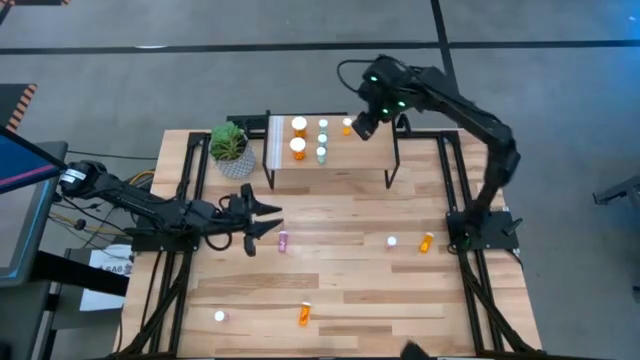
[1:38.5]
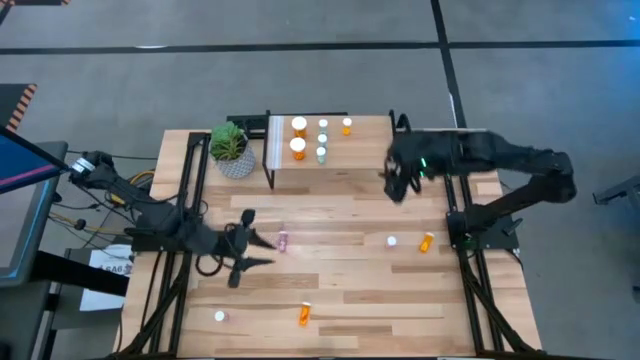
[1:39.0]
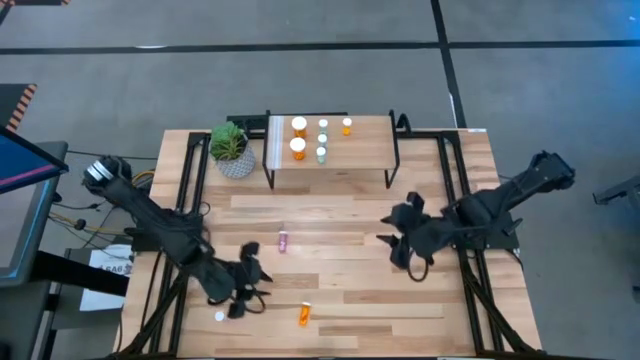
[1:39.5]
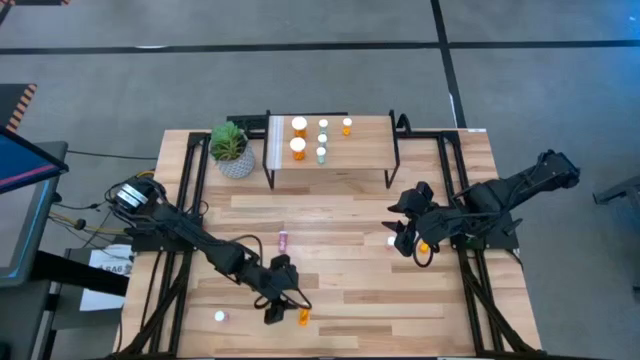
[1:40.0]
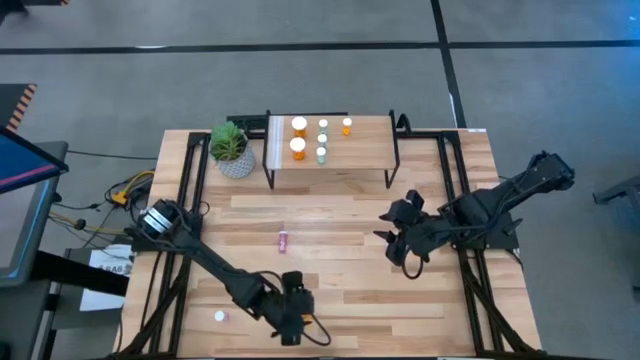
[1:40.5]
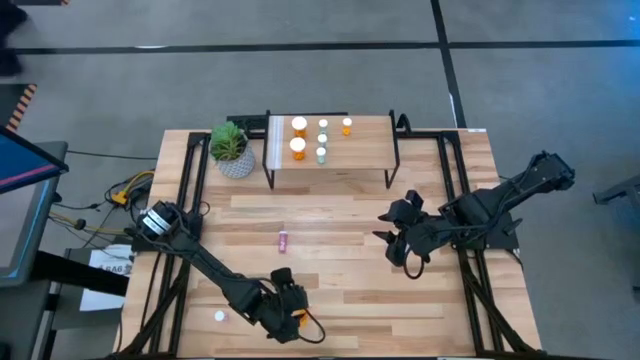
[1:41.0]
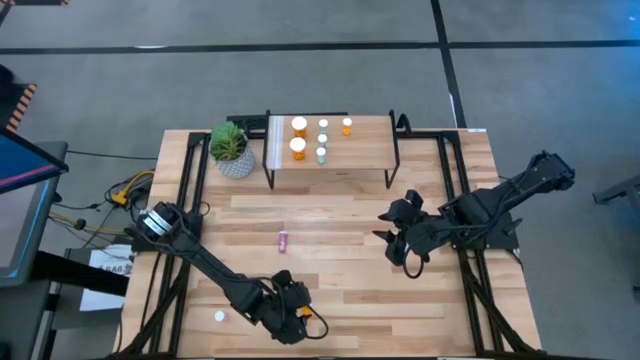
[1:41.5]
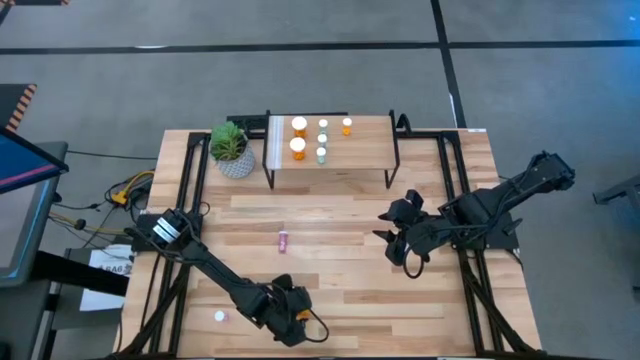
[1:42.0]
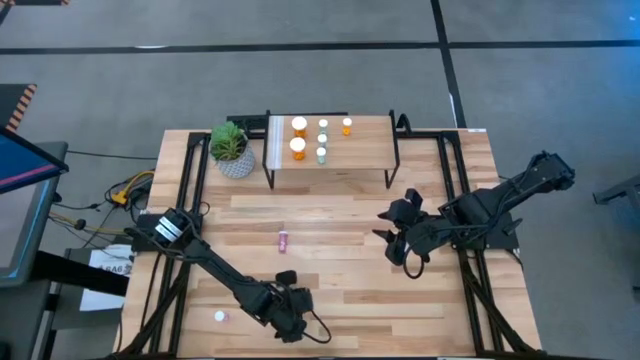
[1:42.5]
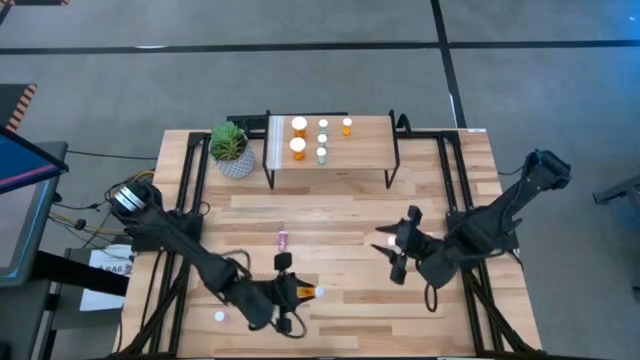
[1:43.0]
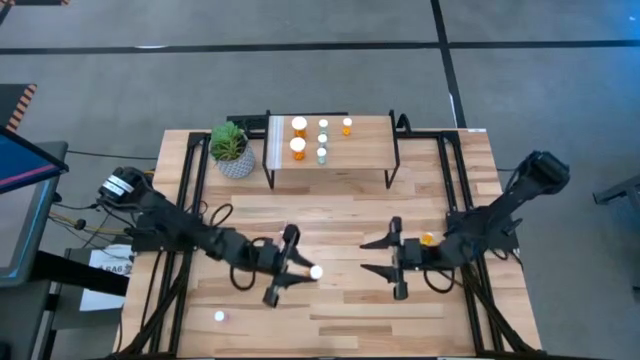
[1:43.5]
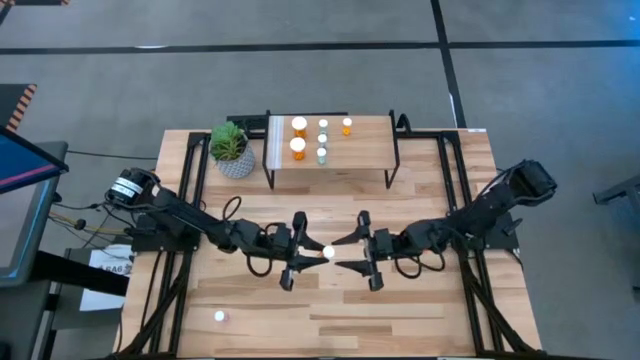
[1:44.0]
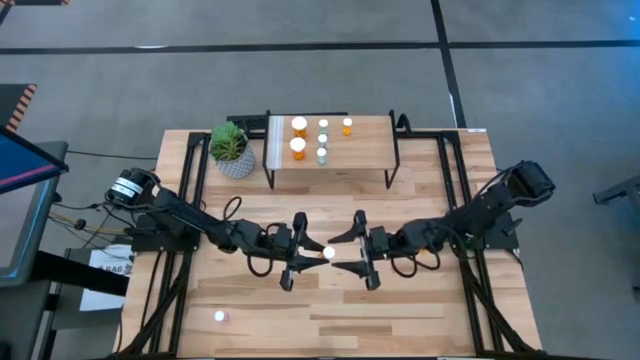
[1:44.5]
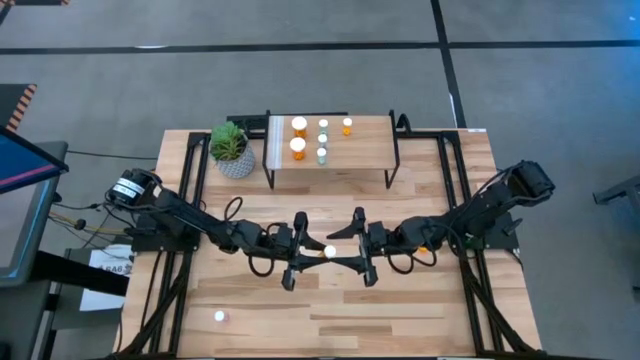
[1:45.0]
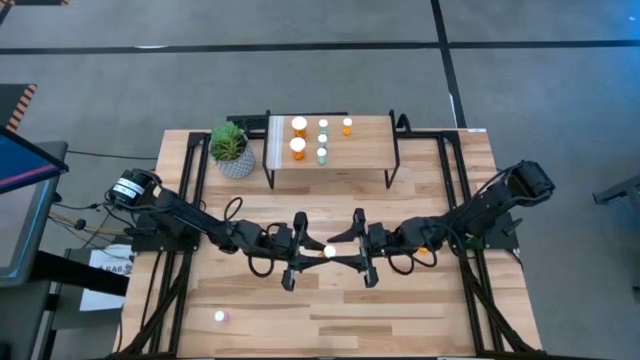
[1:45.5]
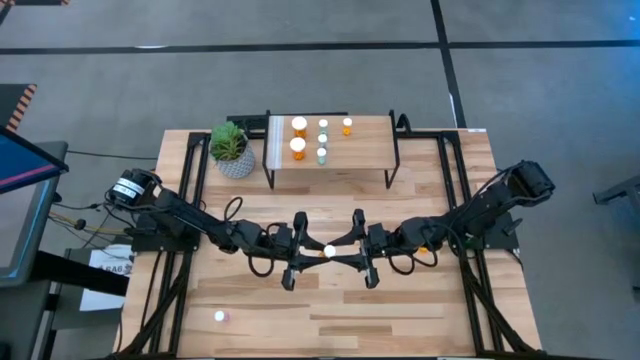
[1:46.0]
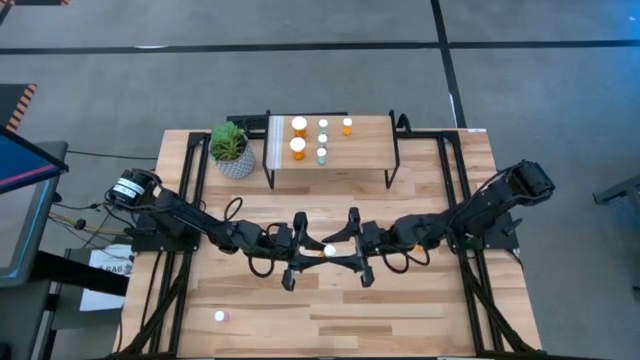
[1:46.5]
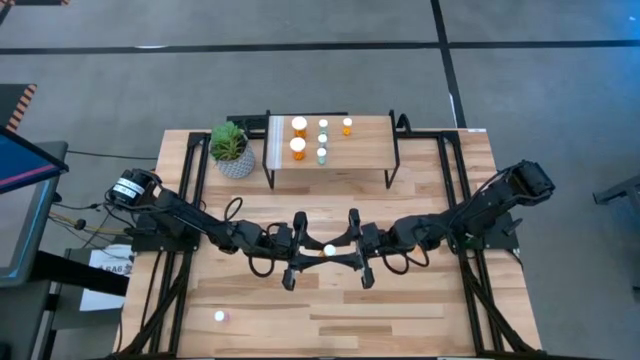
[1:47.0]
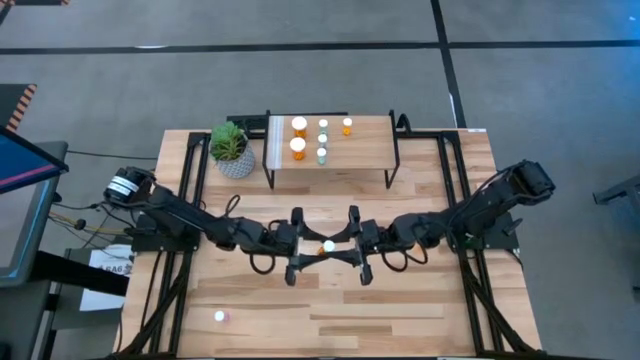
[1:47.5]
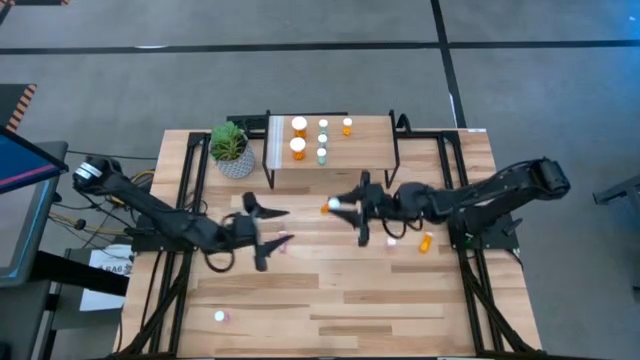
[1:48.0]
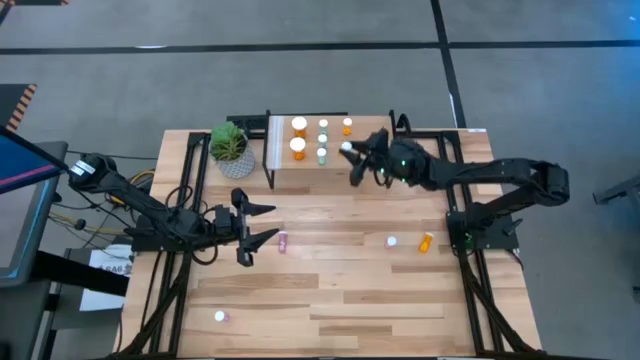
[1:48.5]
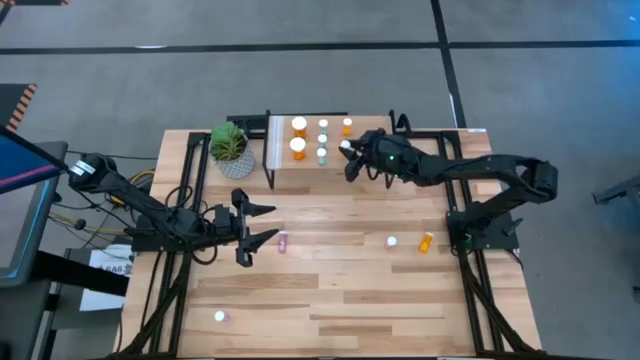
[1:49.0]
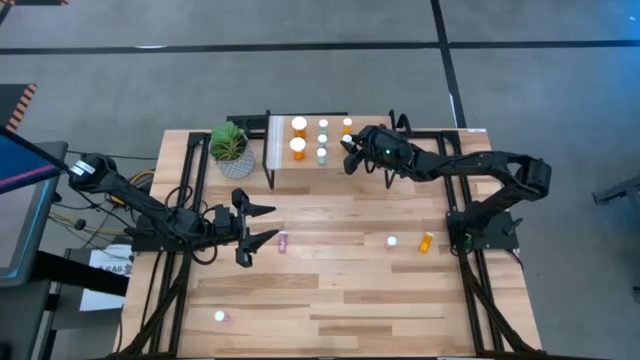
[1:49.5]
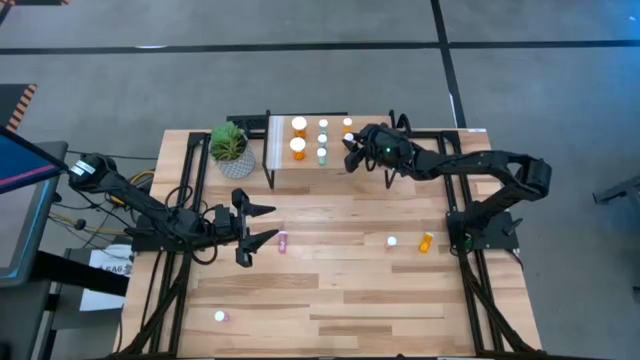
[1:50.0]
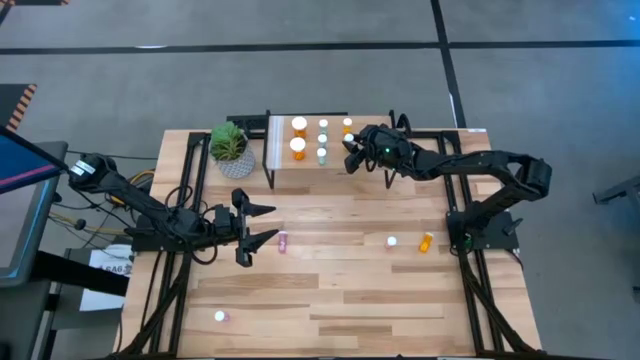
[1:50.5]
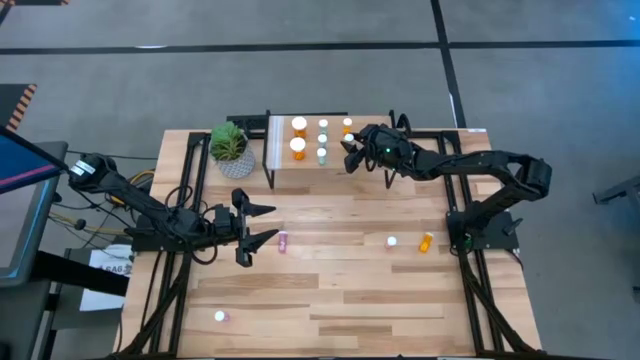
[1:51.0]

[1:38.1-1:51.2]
Task: Pick and place medicine bottles onto shelf by color
Put the small orange pill bottle on the shelf aligned with the other small orange pill bottle

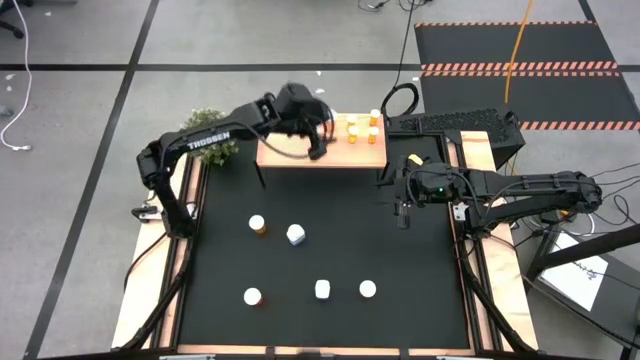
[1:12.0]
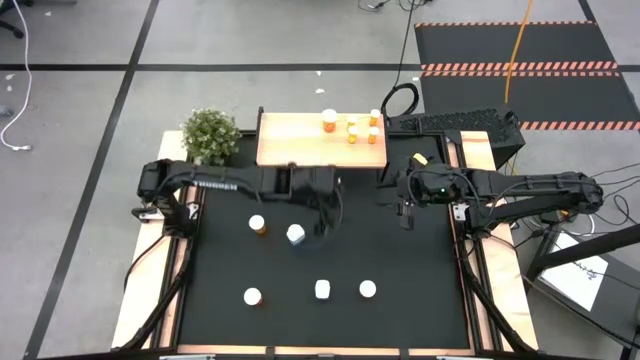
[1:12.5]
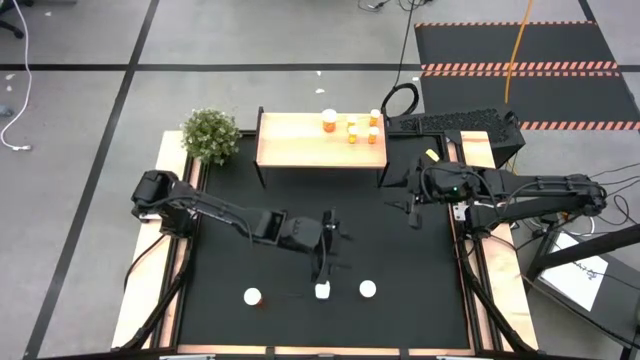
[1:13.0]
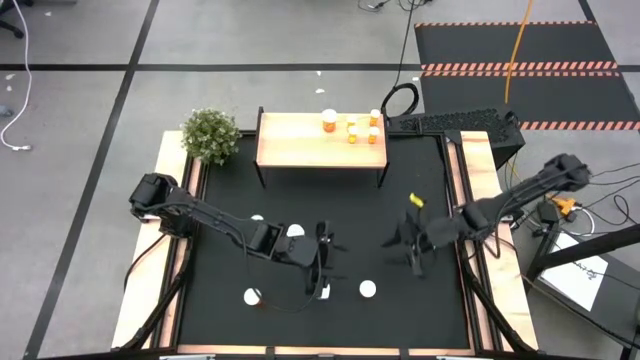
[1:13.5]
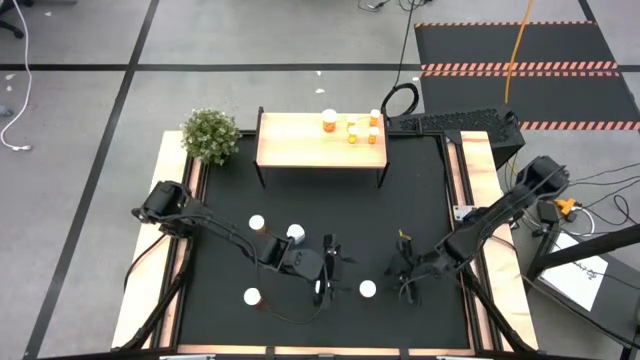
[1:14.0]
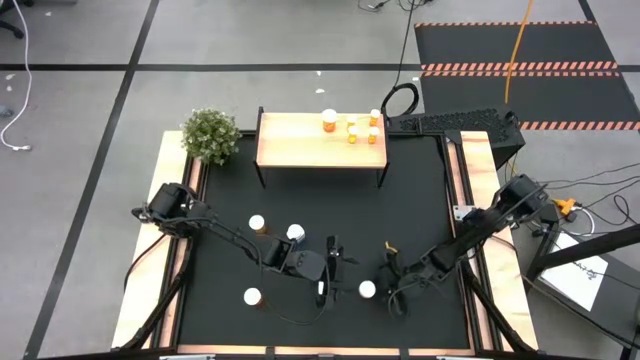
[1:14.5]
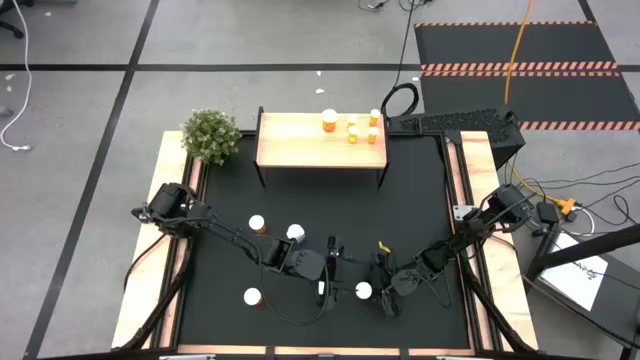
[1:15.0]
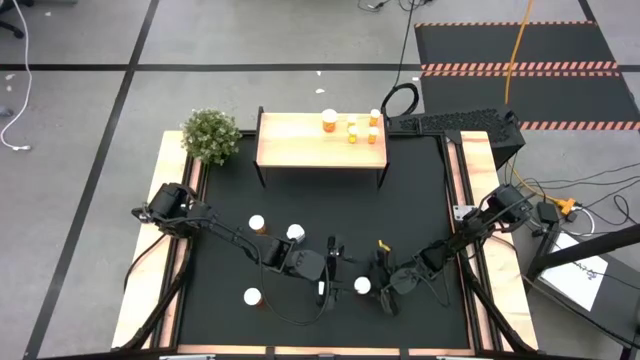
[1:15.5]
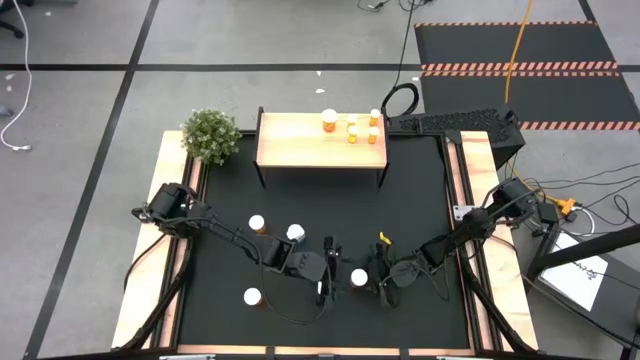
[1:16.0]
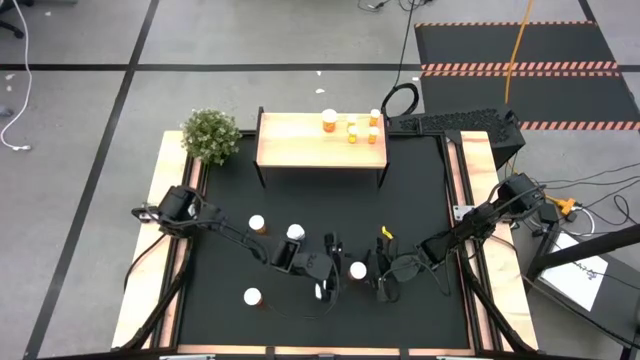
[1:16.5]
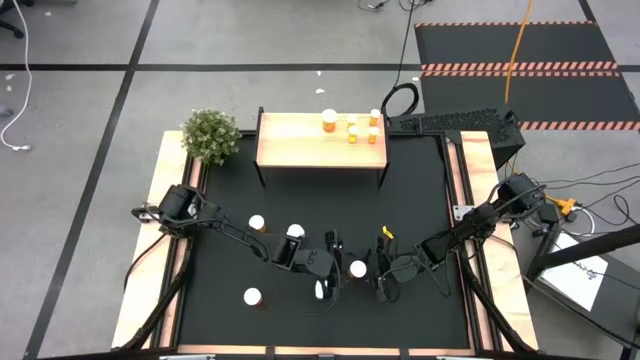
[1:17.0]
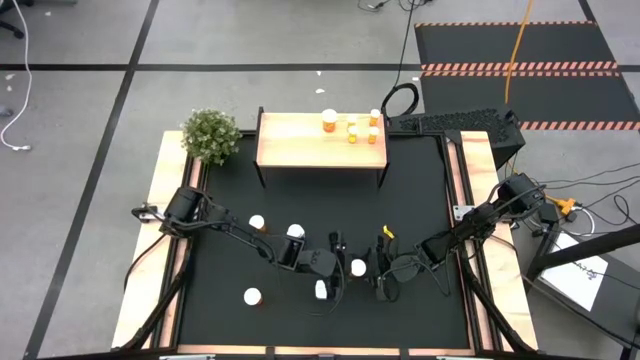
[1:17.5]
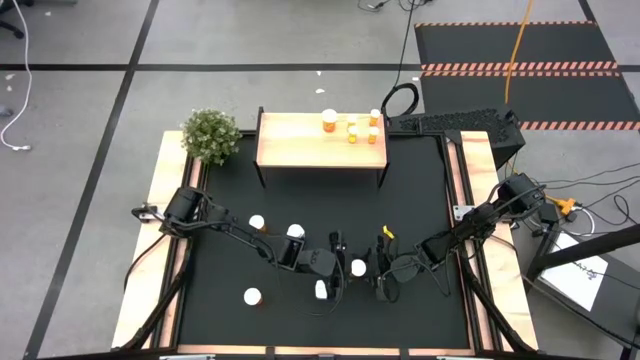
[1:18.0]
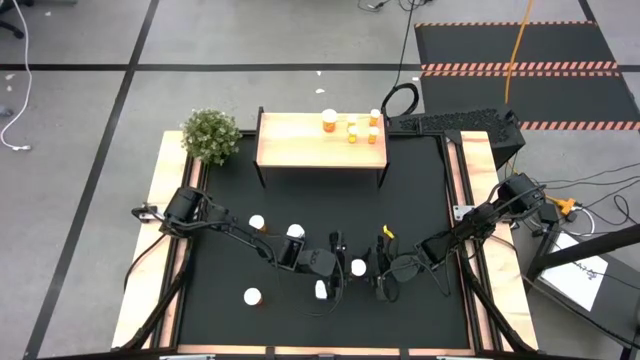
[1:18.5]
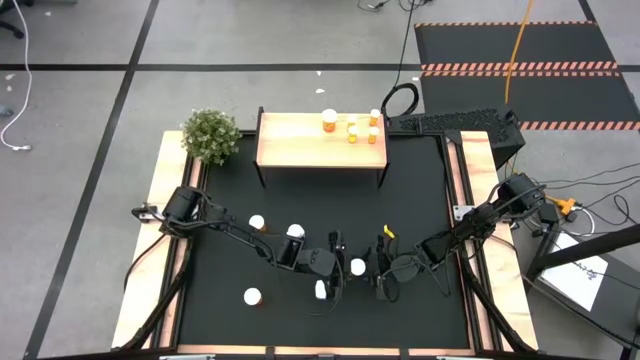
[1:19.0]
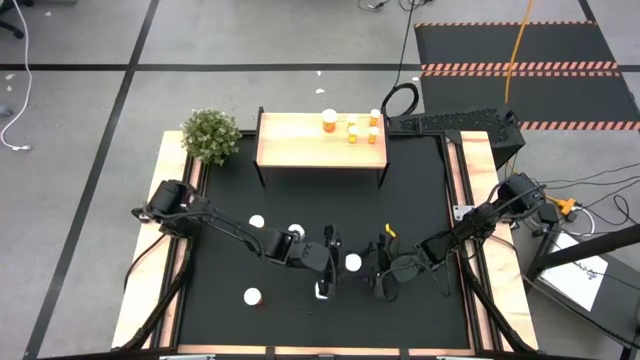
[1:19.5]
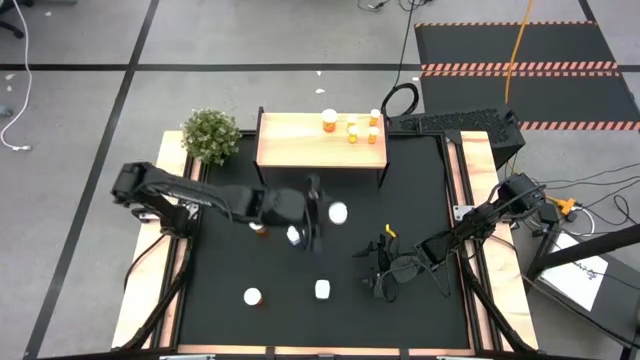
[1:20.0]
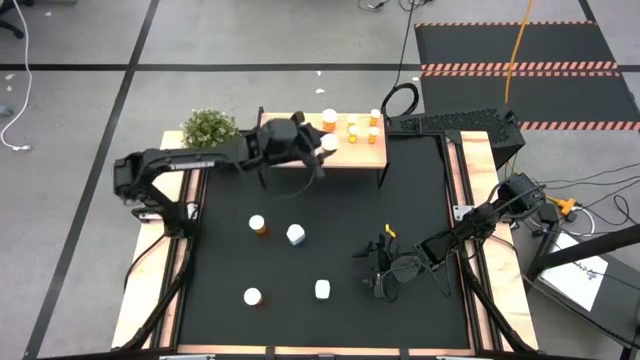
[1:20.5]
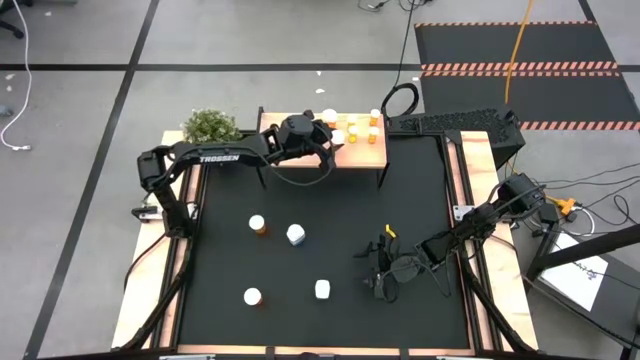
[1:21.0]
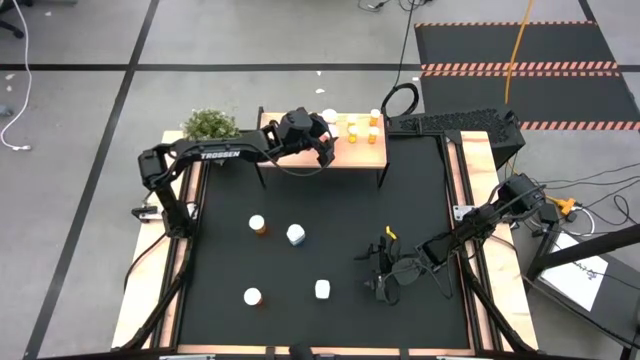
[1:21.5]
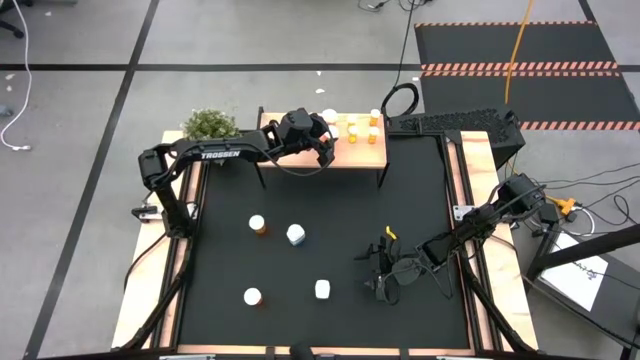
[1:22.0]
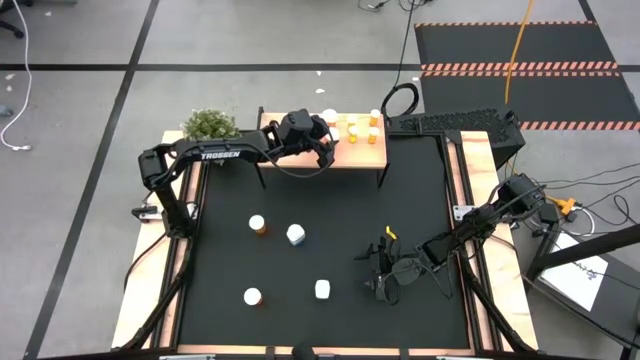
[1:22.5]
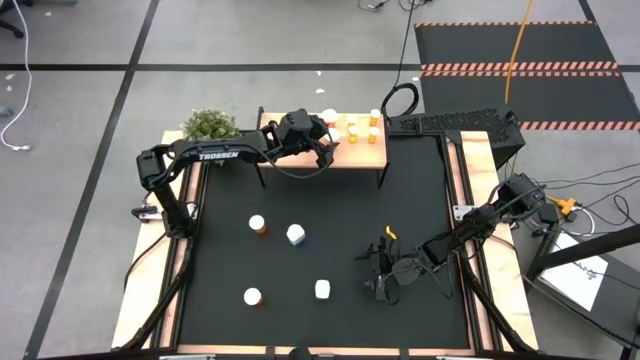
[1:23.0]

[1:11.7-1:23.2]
Task: Pick and place medicine bottles onto shelf by color
Put the large orange pill bottle on the shelf aligned with the other large orange pill bottle
